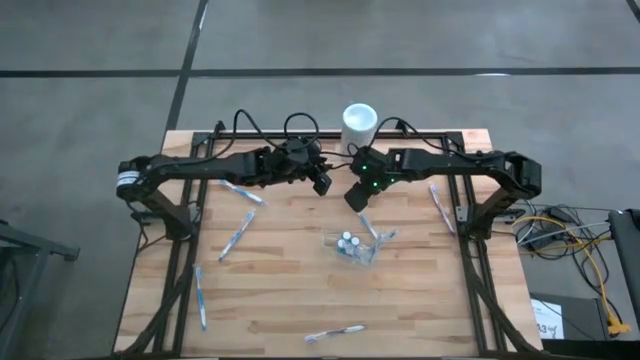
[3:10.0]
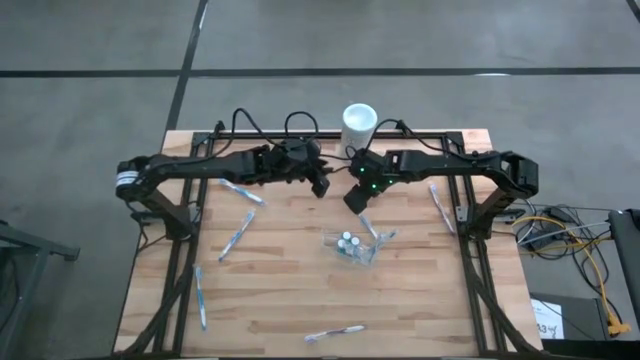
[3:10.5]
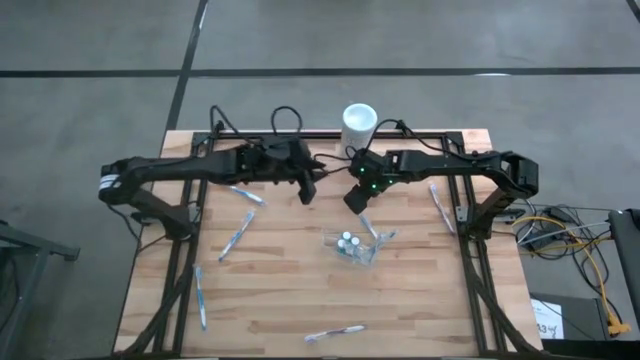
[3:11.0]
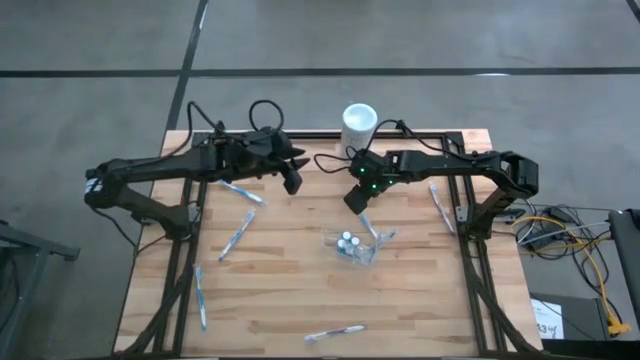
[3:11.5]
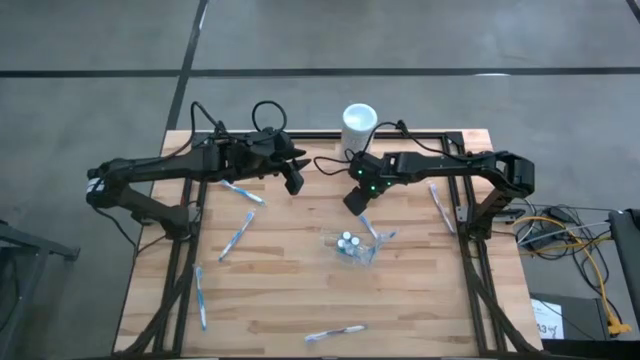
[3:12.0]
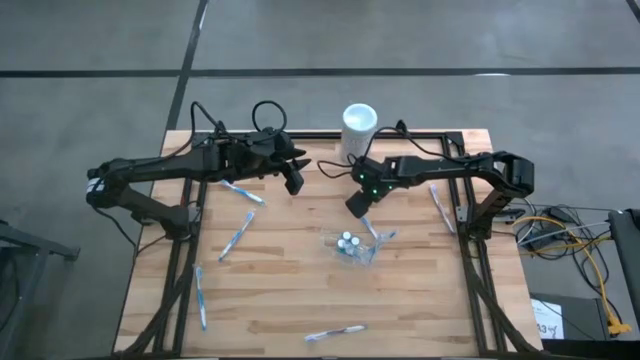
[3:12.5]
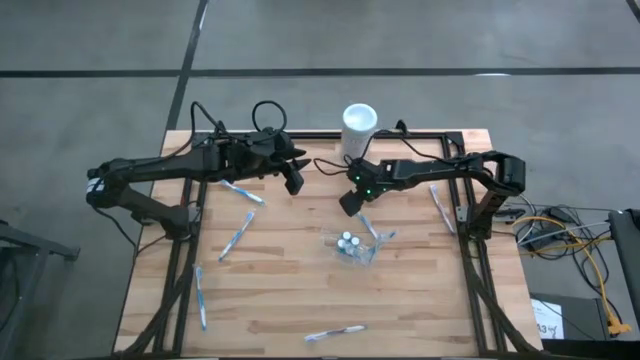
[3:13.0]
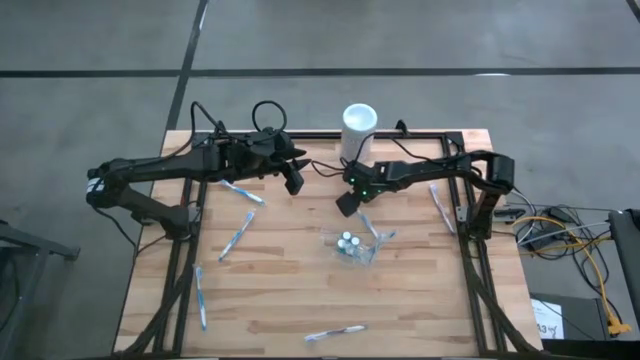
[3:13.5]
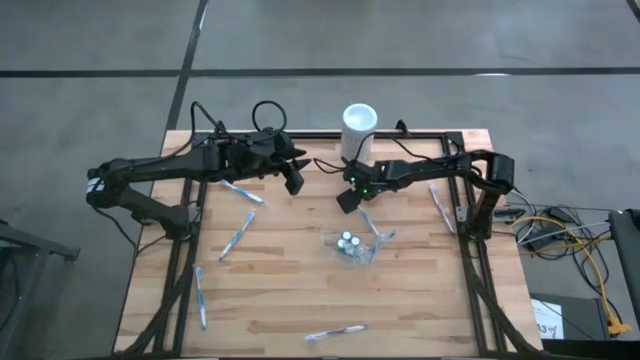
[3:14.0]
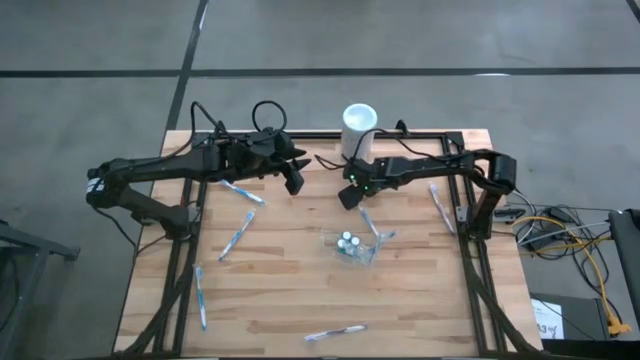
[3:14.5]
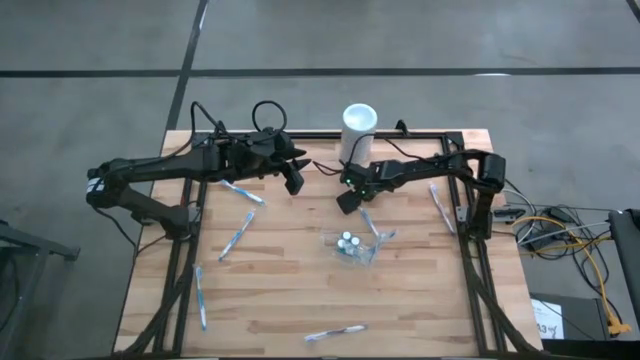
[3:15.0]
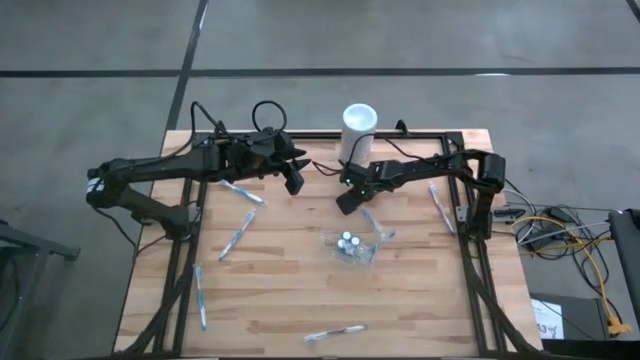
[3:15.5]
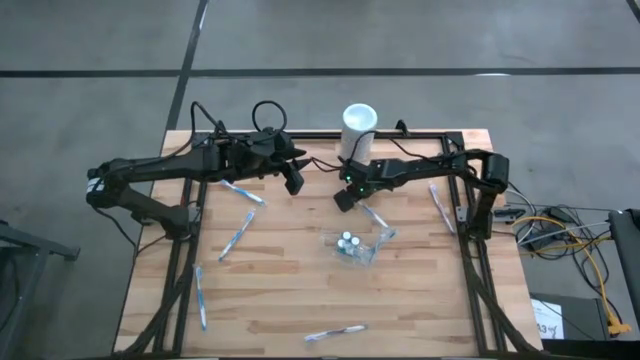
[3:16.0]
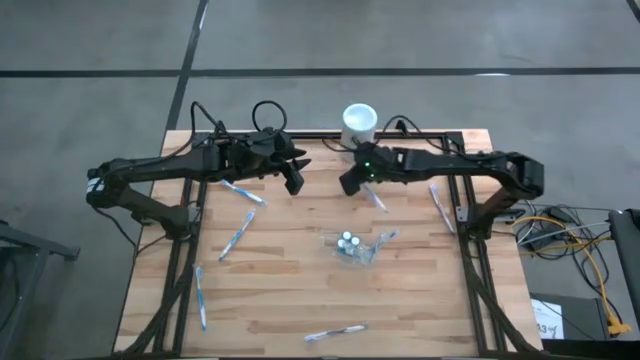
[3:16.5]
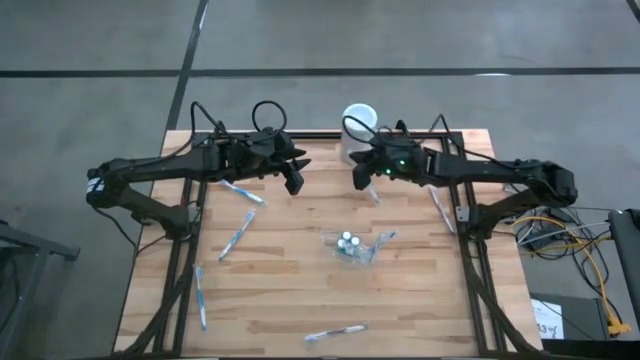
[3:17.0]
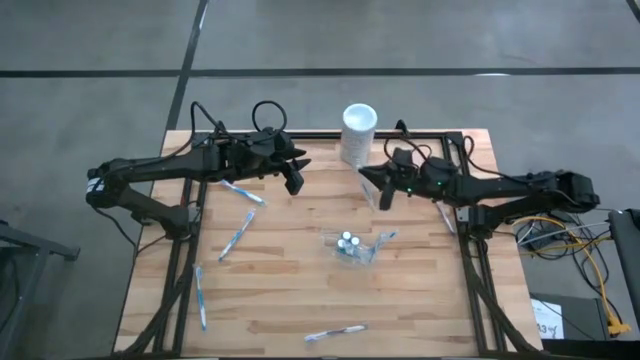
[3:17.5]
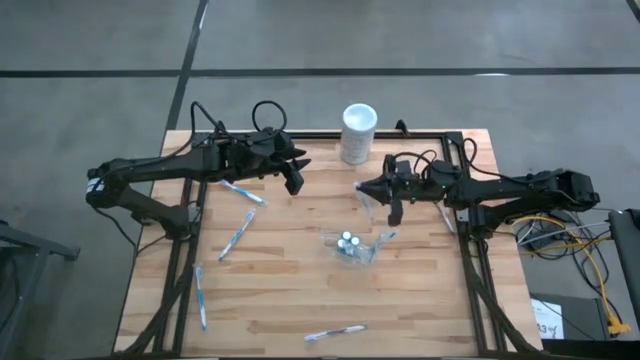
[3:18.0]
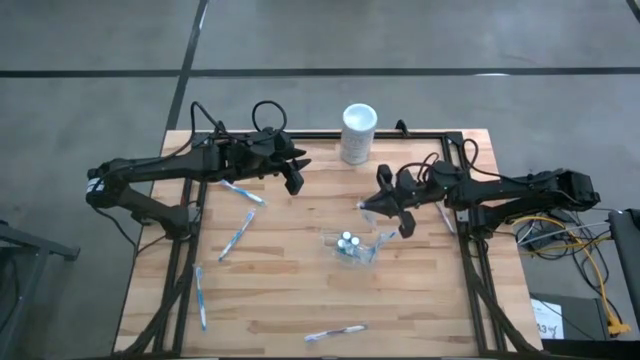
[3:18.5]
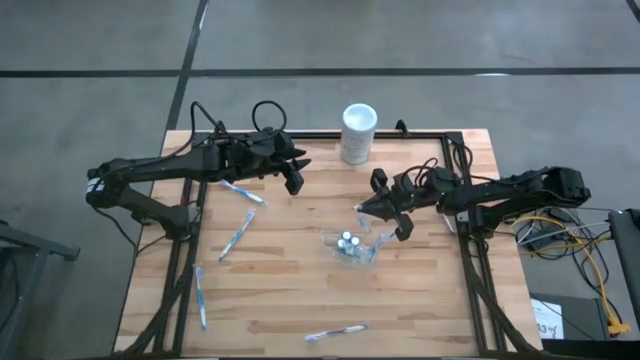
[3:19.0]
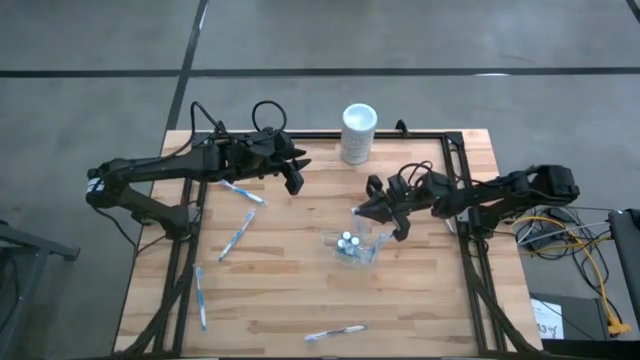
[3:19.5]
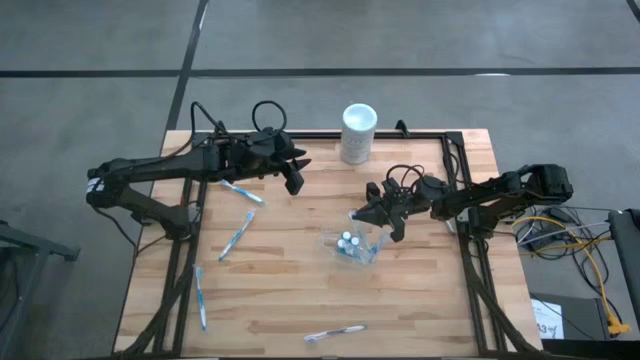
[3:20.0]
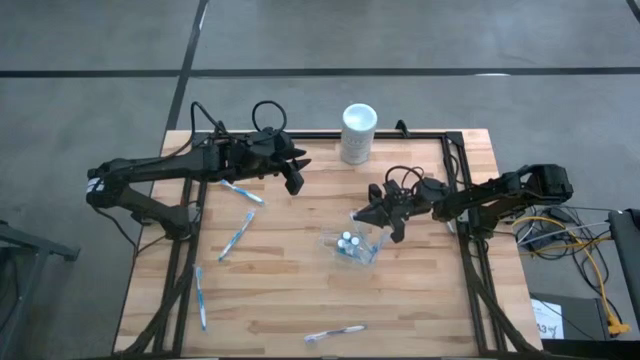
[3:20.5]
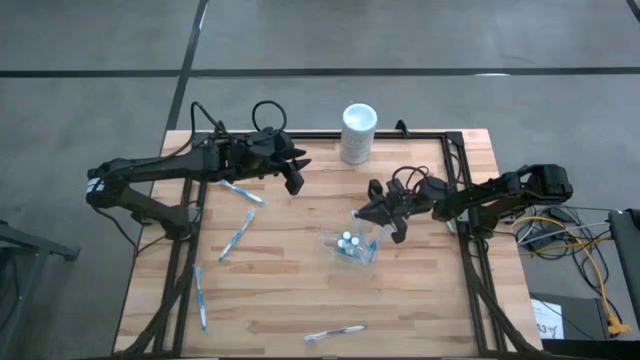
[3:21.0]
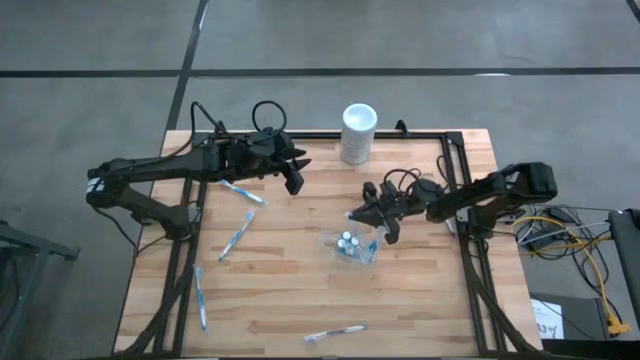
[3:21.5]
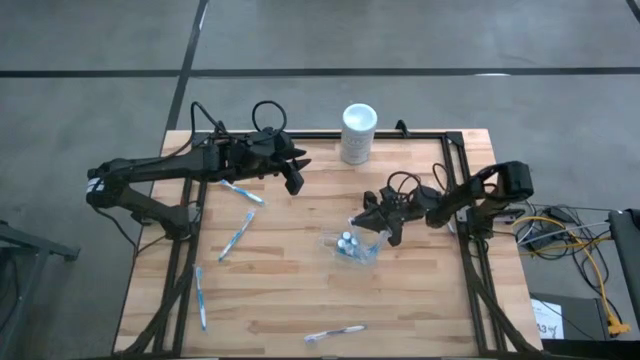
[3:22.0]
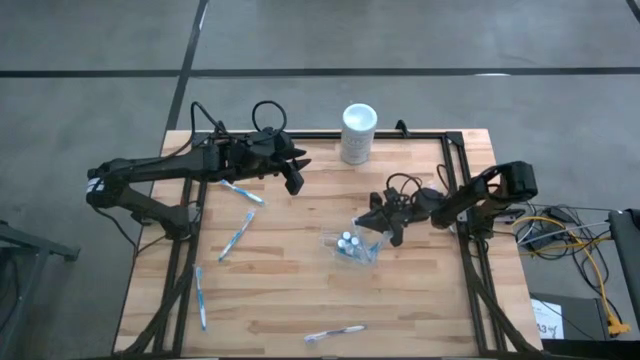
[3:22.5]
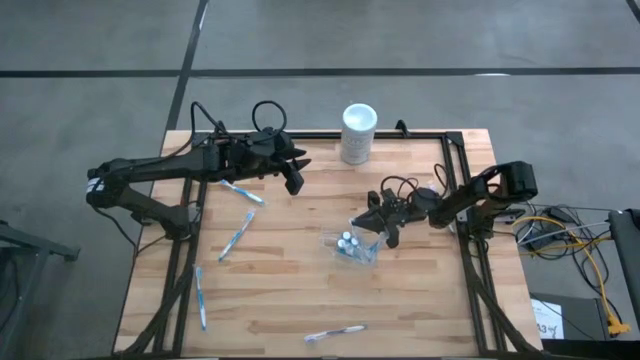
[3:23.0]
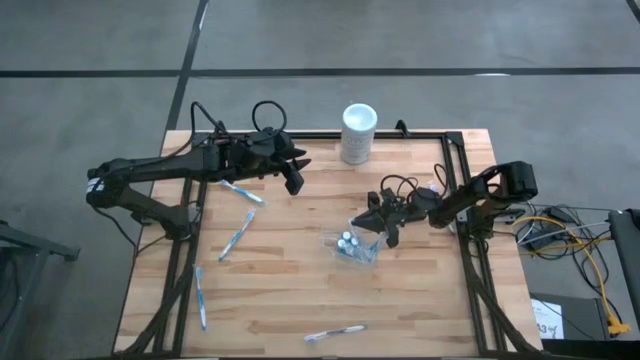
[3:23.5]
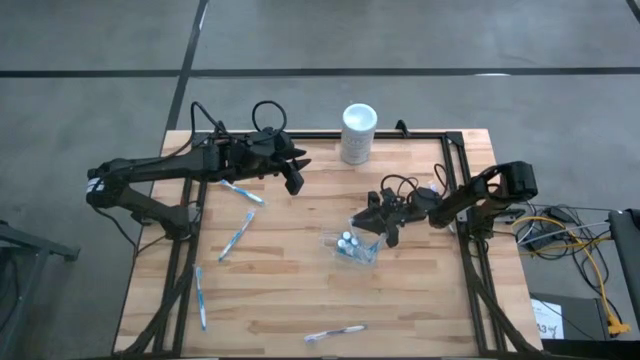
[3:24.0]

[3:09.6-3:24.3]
Task: Pick & Place toothbrushing station
Put the blue toothbrush into the transparent organizer

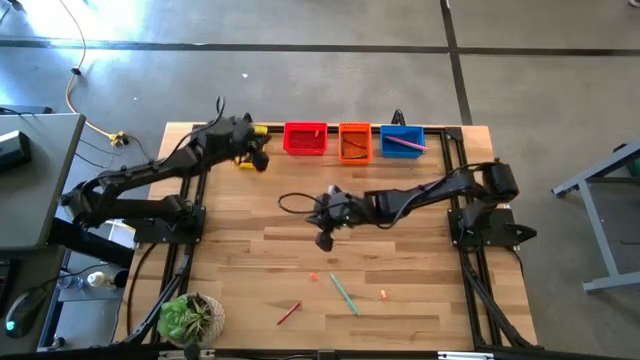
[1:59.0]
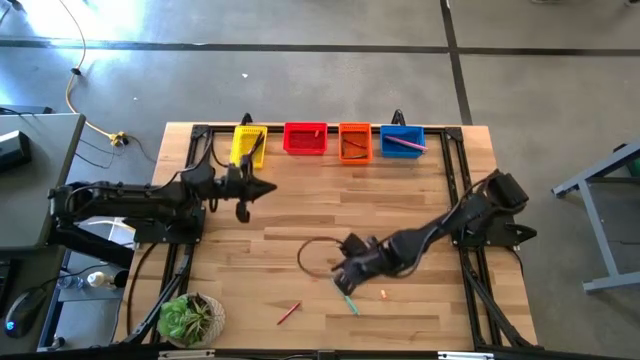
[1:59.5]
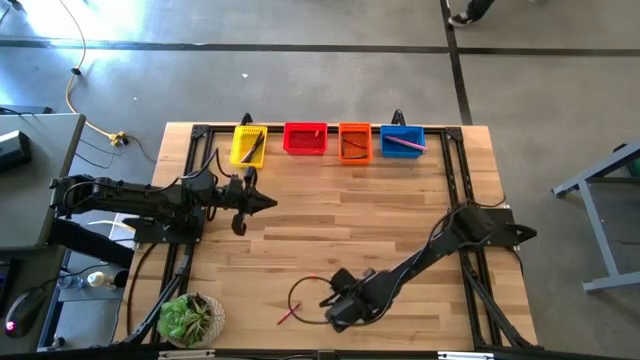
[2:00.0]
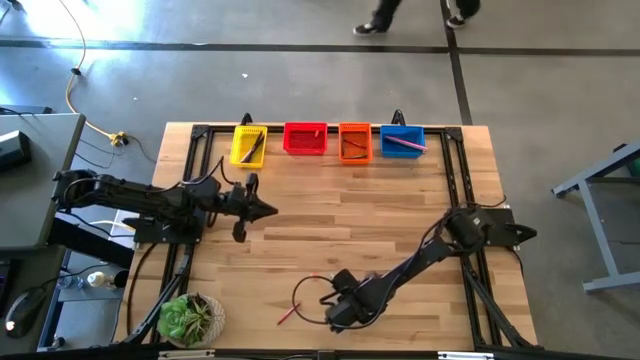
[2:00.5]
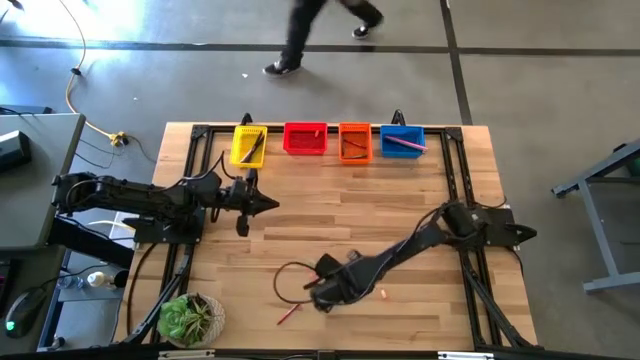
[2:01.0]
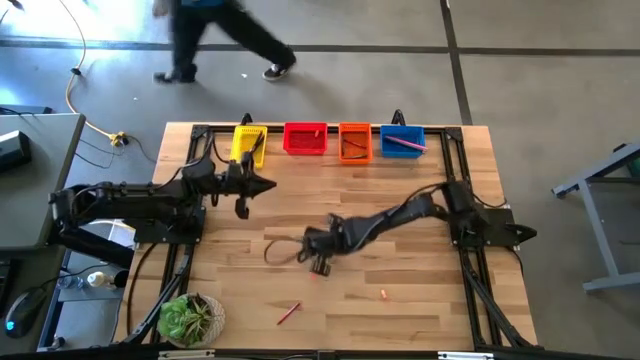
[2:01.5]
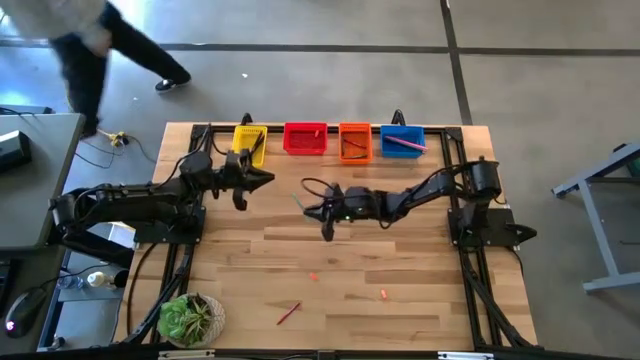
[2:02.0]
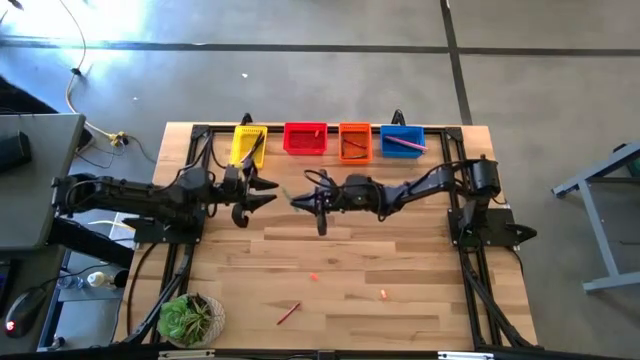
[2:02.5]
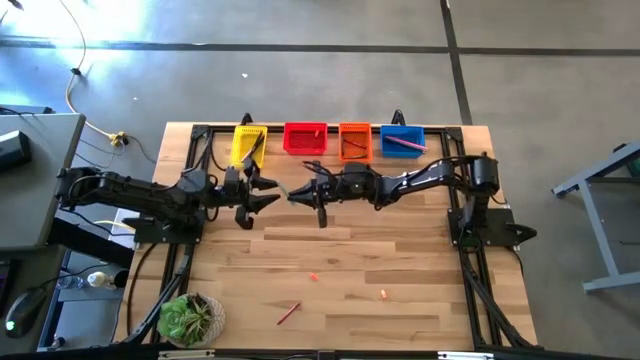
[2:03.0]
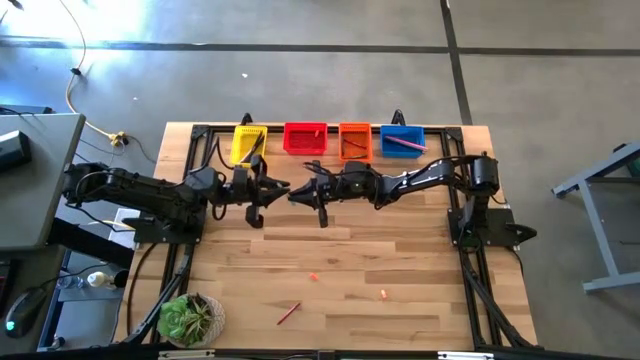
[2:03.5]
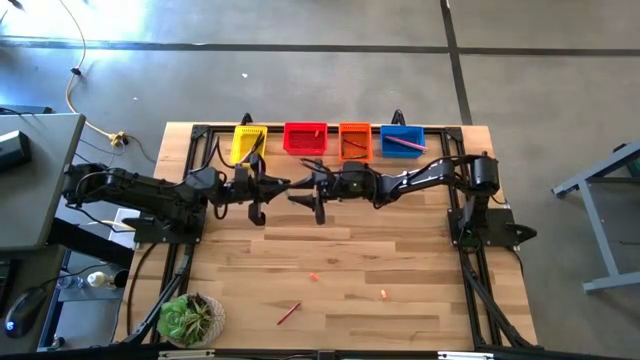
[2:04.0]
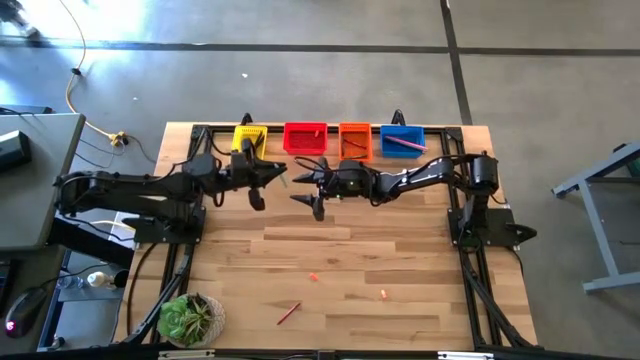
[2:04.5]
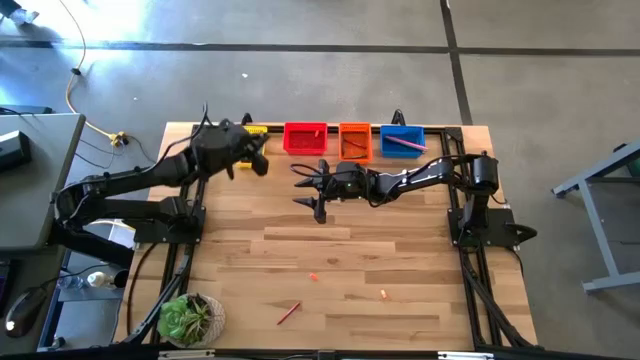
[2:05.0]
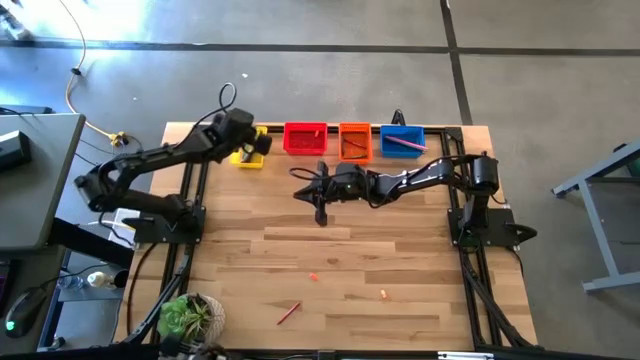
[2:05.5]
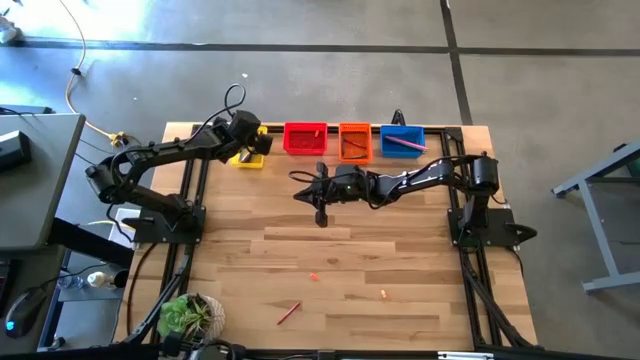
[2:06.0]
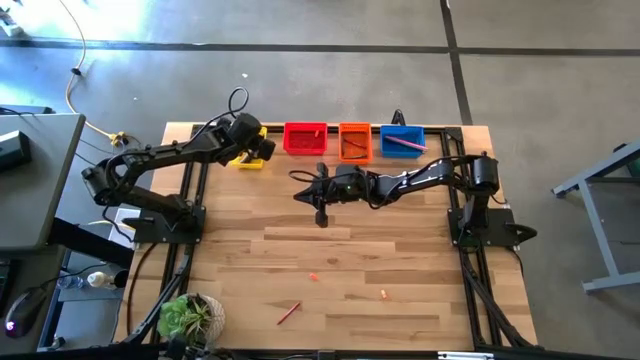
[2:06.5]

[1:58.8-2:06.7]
Task: Sort crayons/erasers/pens/pencils in bins
Put the blue pen into the yellow basket
